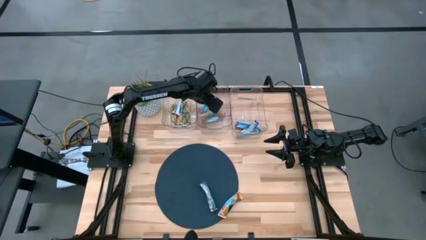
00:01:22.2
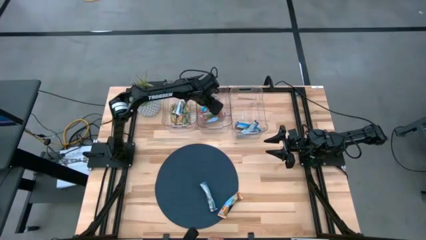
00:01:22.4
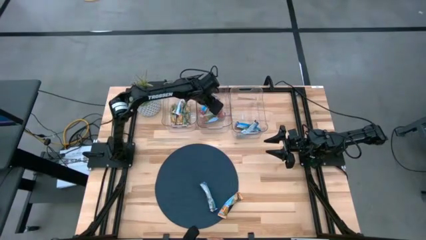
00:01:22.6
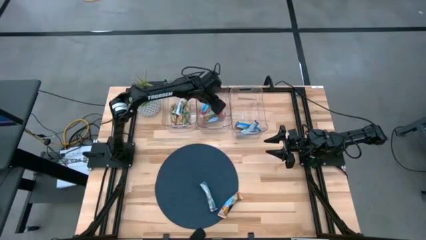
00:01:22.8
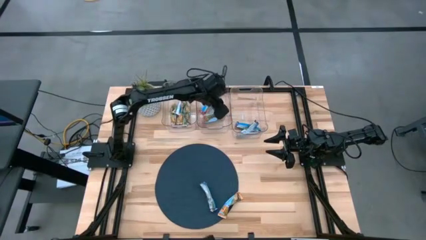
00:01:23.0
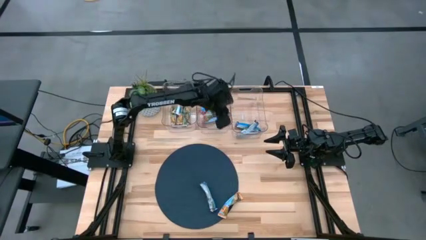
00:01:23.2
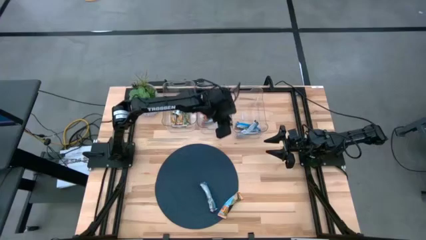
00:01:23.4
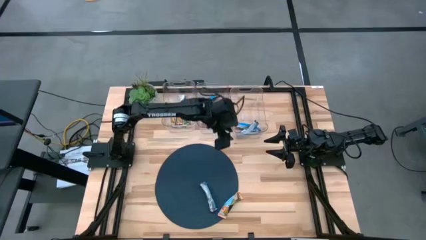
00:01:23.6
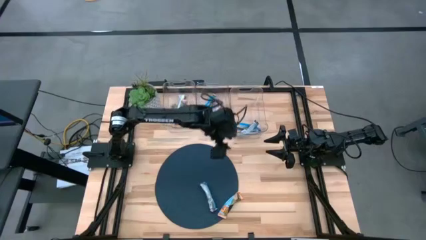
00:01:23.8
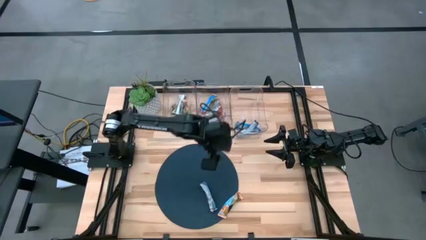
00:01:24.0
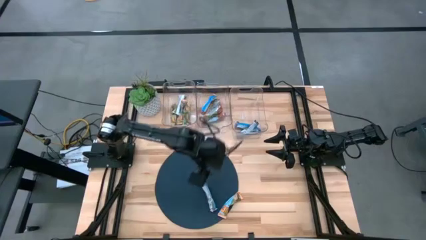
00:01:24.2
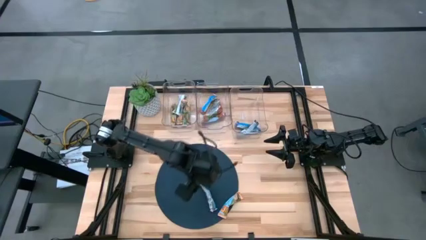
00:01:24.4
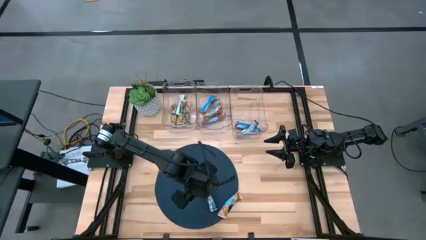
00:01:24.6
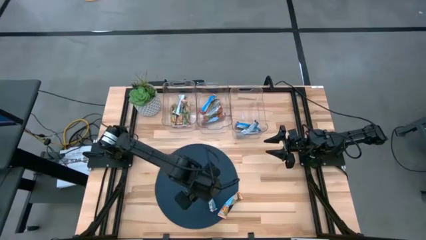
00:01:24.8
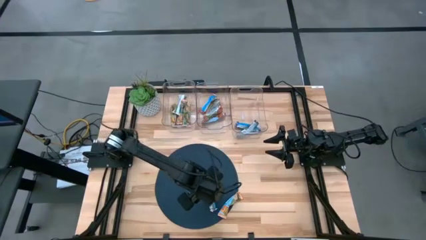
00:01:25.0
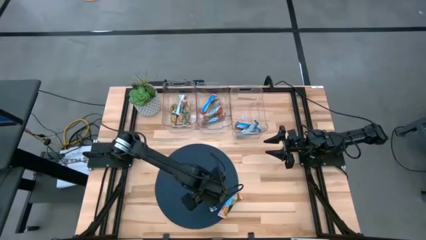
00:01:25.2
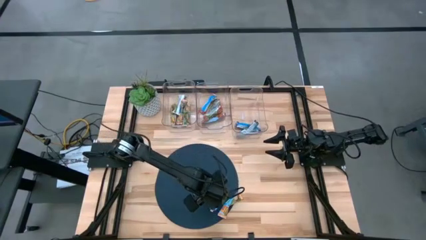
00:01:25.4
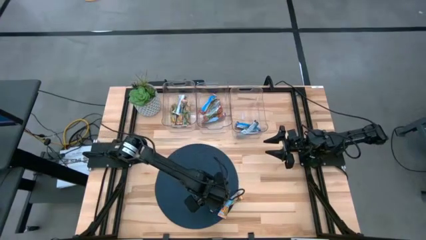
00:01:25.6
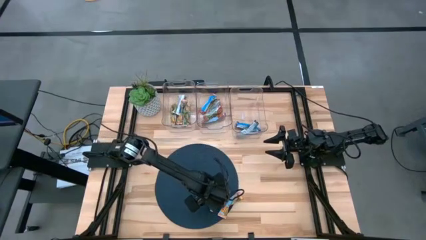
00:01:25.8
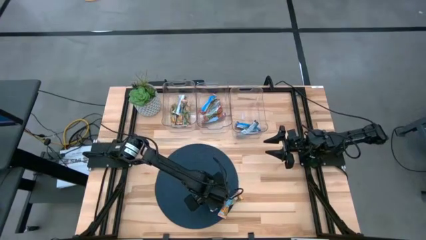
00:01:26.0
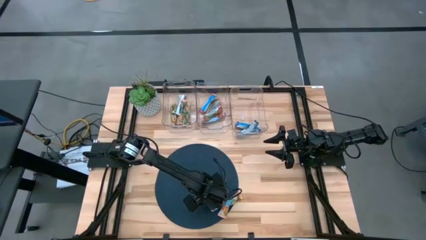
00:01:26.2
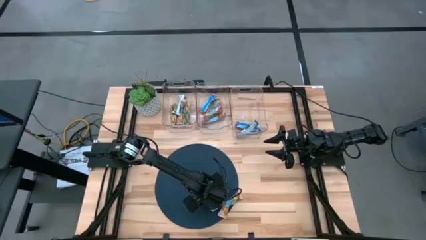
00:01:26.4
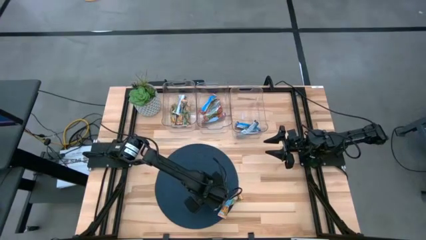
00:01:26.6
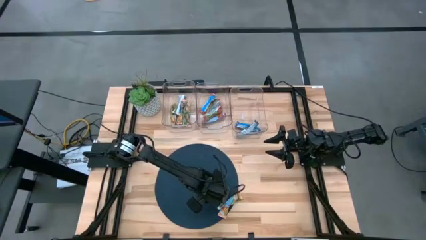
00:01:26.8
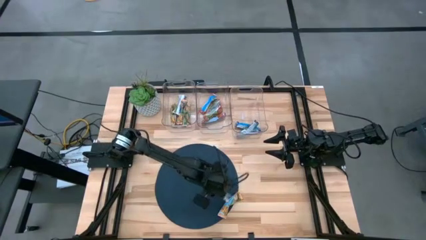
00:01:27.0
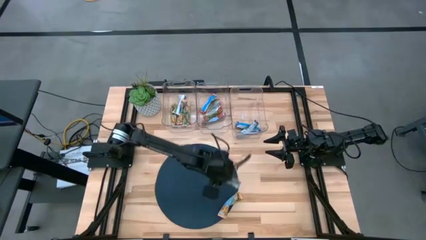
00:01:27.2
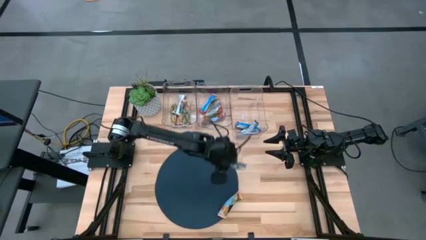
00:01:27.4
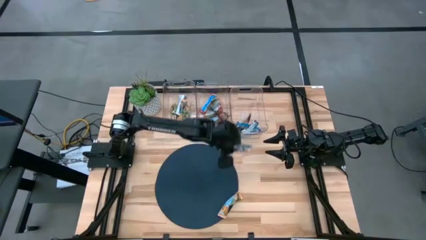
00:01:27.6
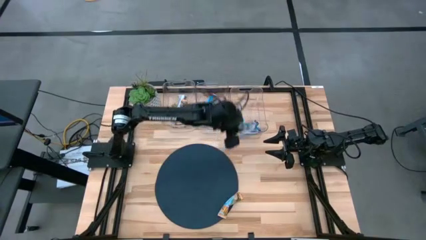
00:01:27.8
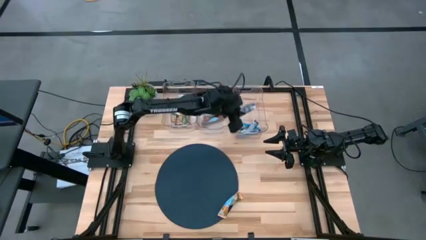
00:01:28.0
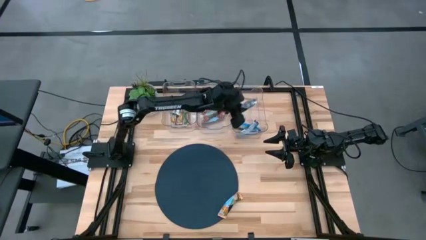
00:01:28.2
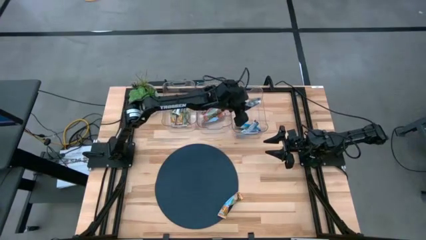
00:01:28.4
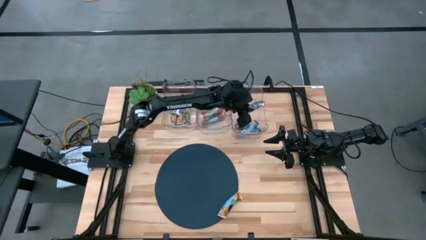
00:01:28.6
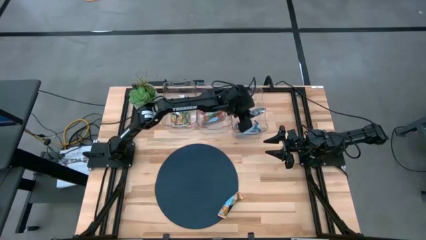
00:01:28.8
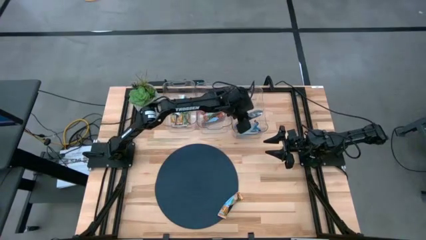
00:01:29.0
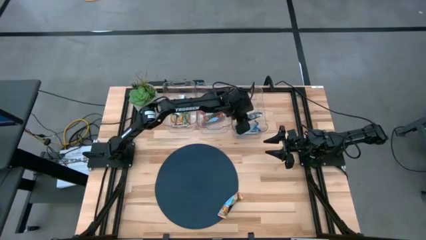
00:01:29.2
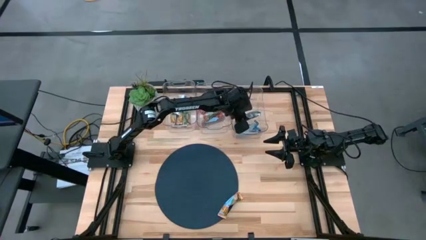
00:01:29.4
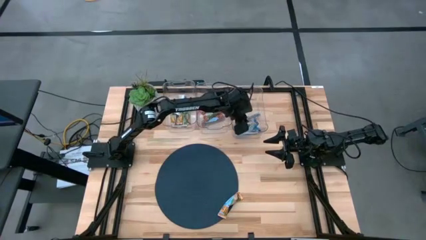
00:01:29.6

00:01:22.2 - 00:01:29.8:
Task: Pick and place Granola Bars by type
Put the blue granola bar into the right transparent bin

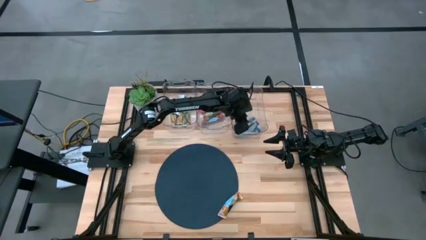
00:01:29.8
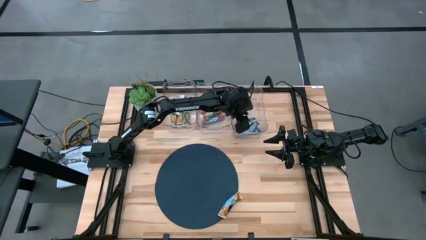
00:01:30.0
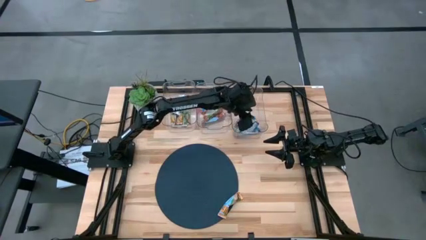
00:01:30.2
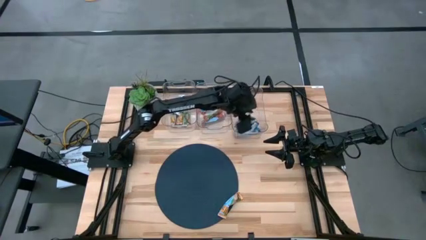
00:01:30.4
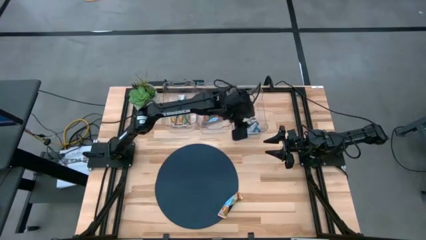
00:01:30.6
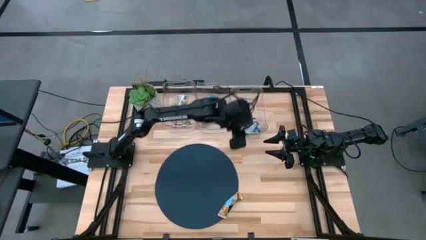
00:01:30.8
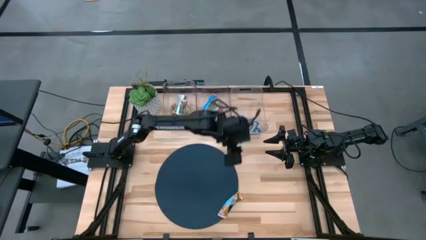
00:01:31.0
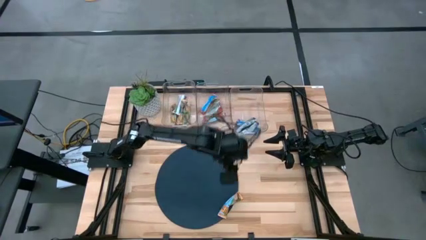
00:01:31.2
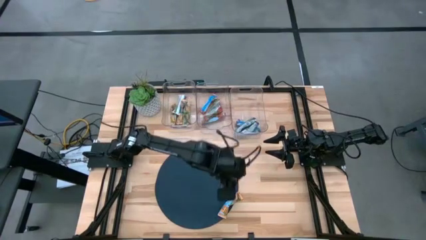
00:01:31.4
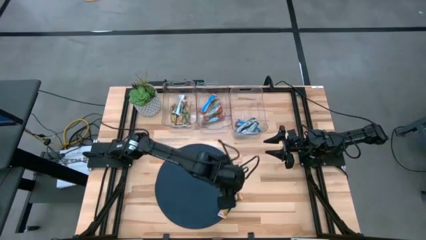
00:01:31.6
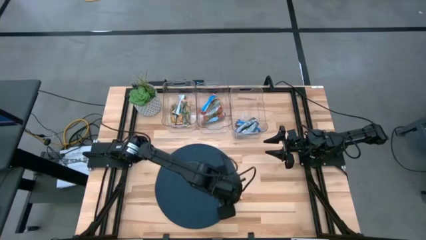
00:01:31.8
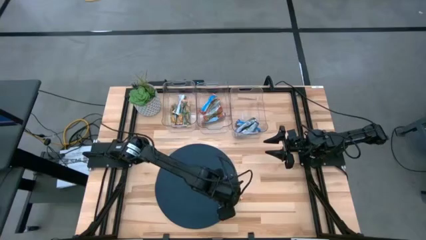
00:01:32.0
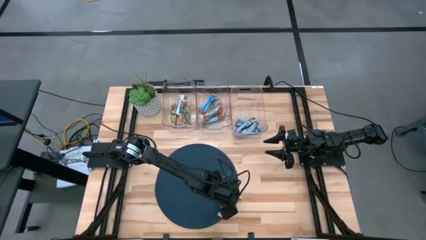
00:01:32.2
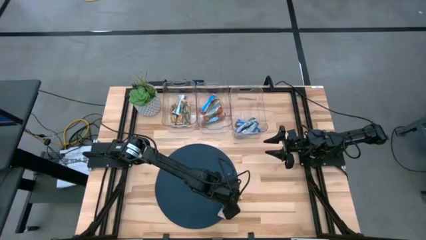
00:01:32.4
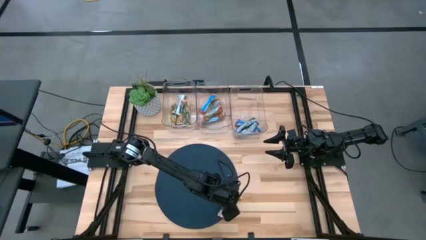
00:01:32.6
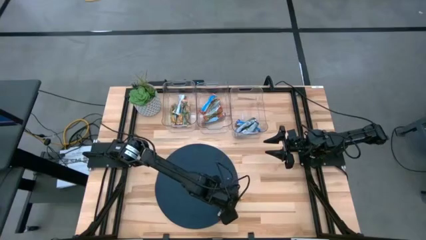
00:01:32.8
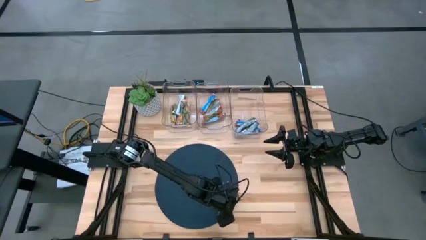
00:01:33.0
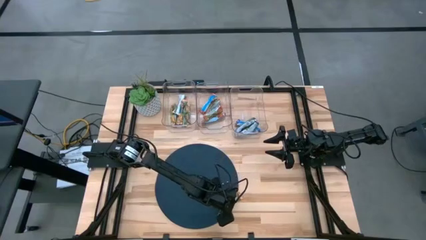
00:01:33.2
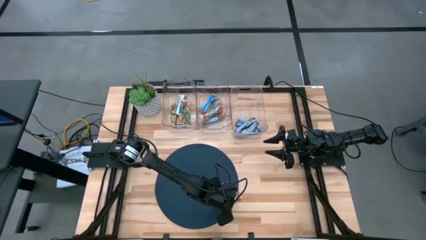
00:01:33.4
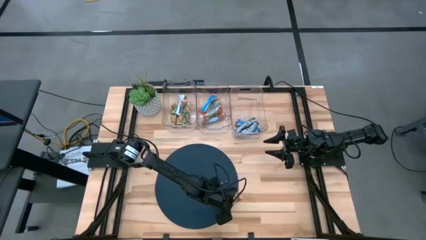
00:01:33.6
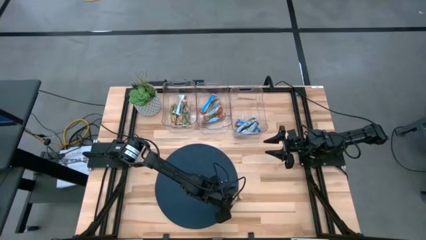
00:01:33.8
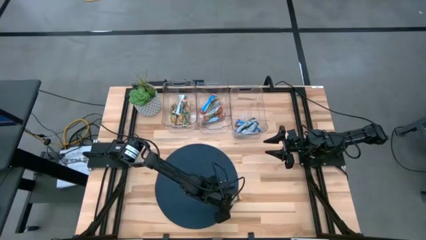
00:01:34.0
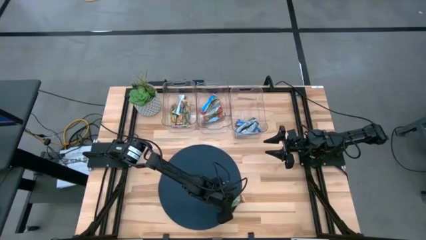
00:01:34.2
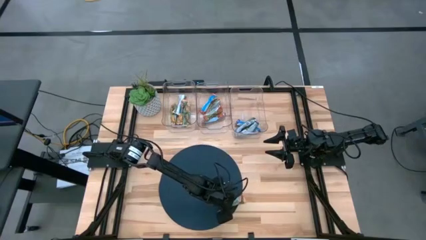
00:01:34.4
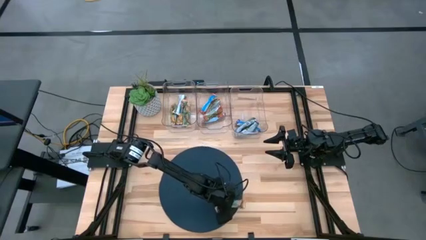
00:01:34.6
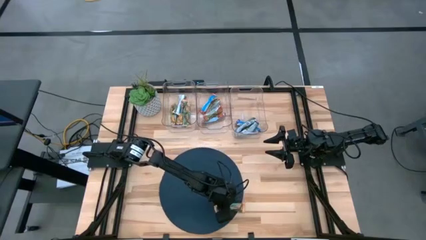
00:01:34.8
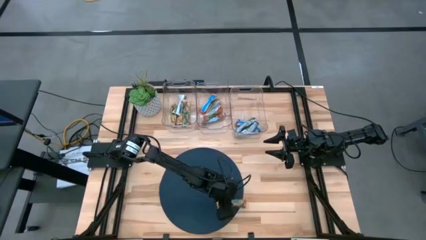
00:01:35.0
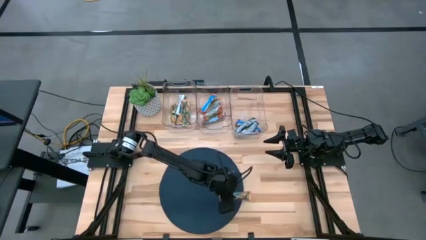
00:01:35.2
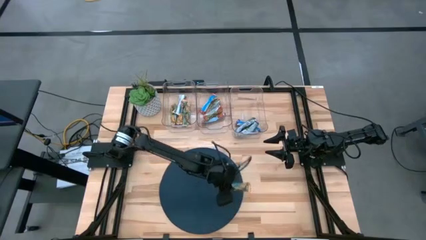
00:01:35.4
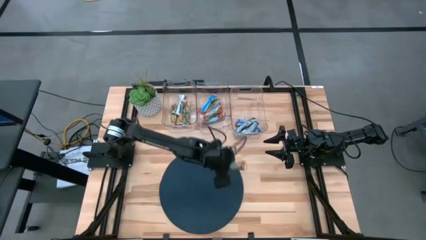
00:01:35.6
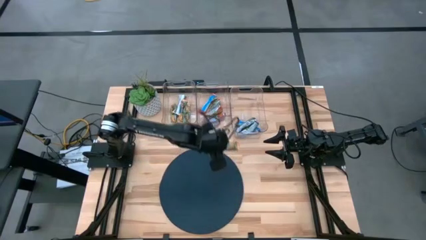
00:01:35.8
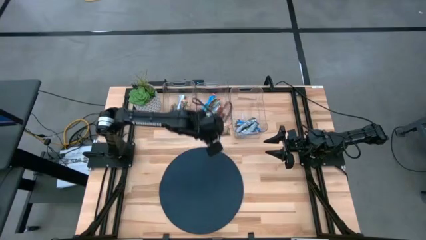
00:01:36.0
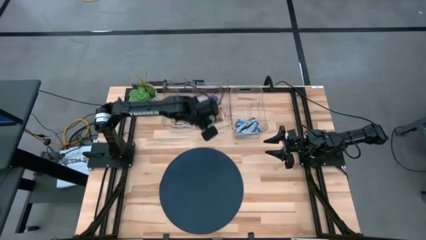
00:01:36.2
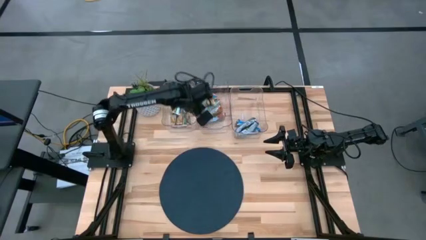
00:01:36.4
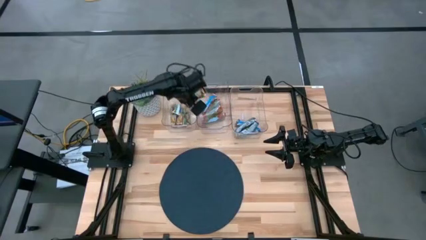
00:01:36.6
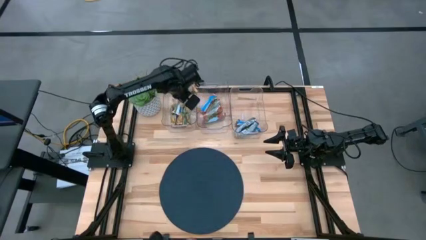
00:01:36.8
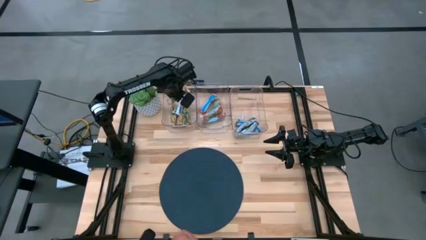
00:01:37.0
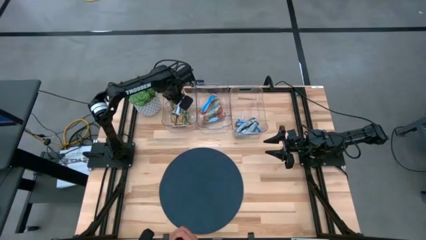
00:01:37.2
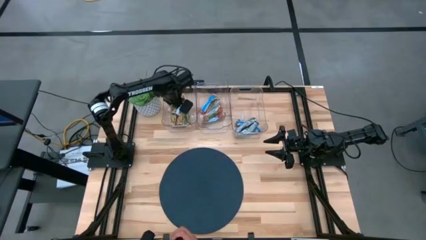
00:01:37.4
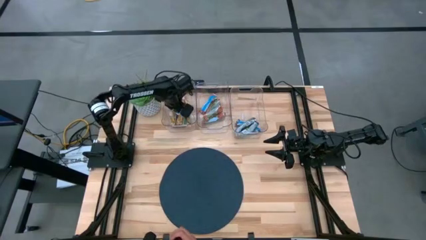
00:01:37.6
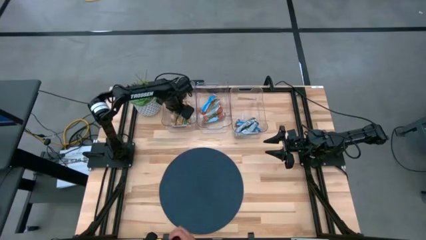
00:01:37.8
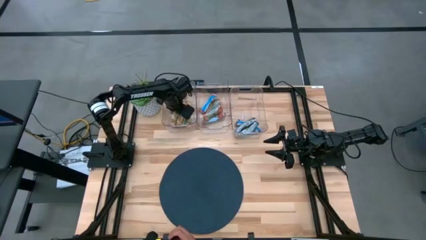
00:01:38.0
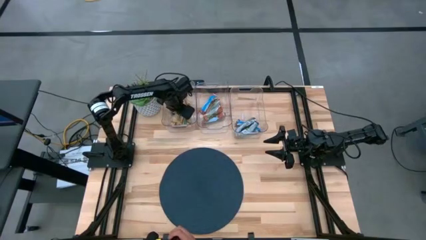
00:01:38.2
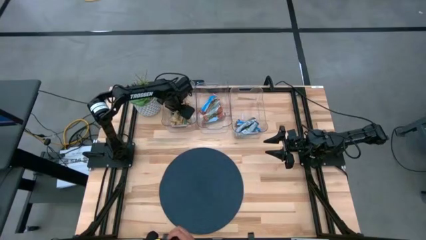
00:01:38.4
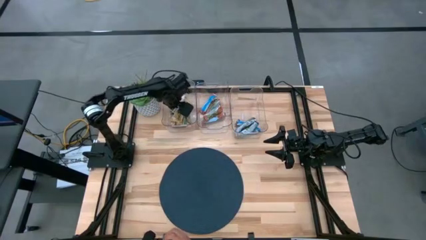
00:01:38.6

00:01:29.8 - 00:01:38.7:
Put the orange granola bar into the right transparent bin
